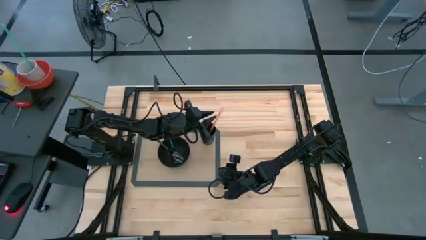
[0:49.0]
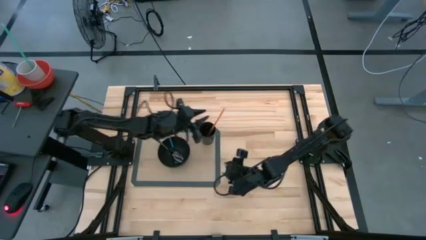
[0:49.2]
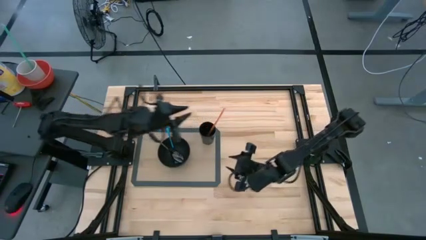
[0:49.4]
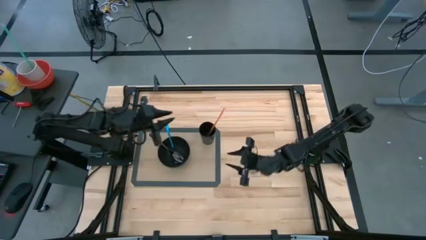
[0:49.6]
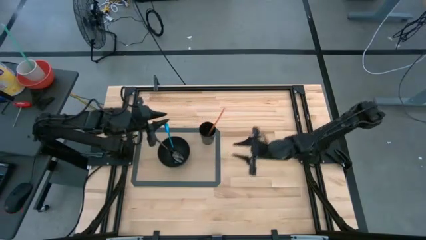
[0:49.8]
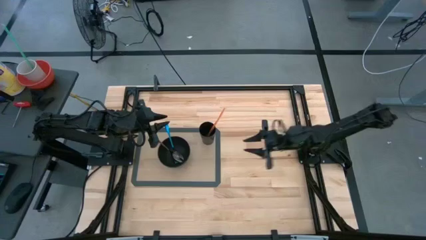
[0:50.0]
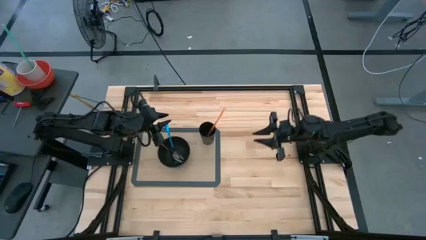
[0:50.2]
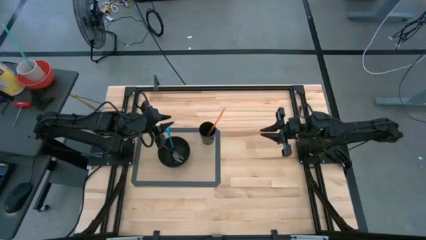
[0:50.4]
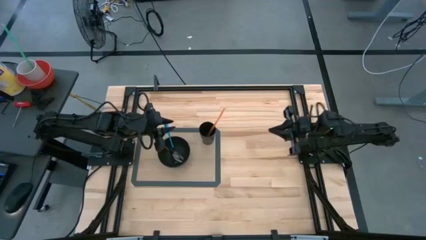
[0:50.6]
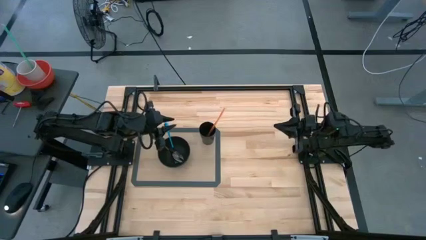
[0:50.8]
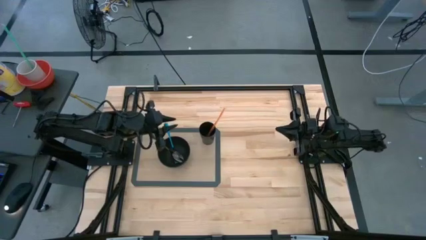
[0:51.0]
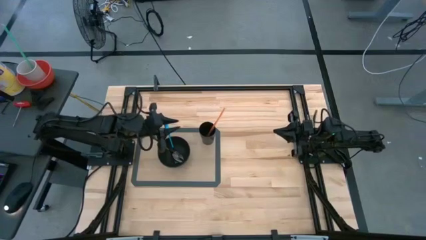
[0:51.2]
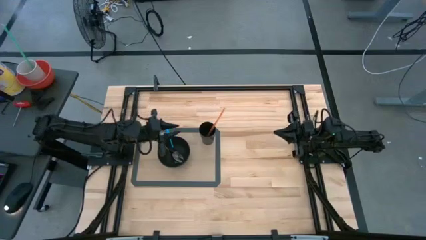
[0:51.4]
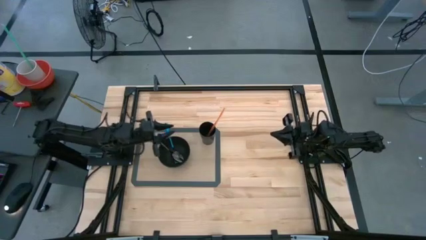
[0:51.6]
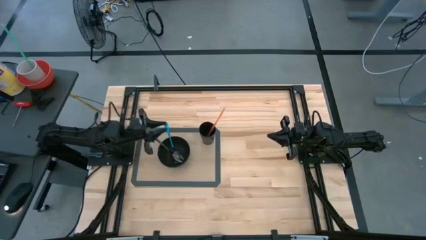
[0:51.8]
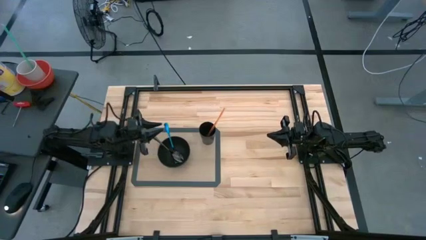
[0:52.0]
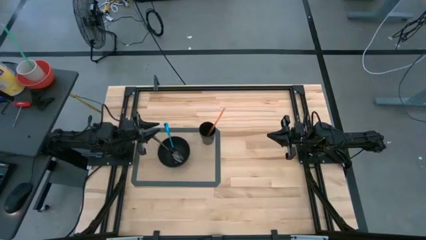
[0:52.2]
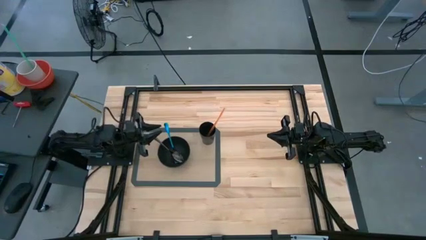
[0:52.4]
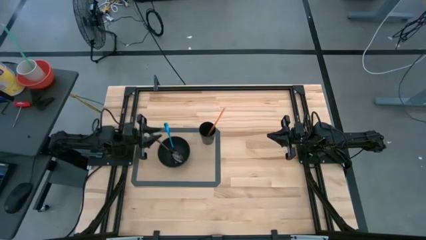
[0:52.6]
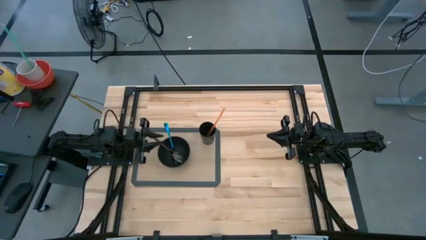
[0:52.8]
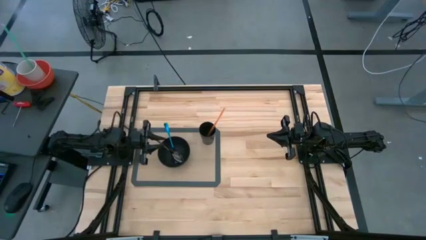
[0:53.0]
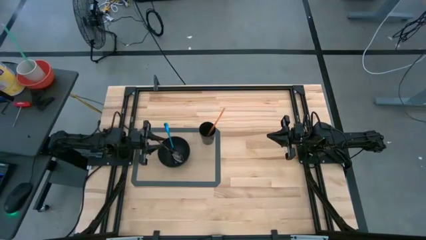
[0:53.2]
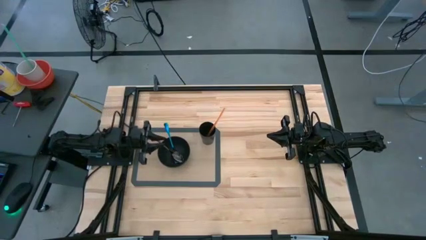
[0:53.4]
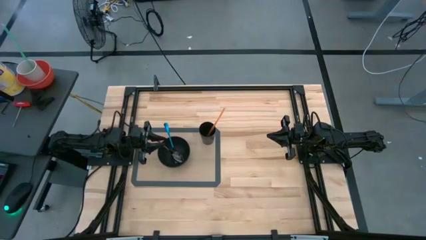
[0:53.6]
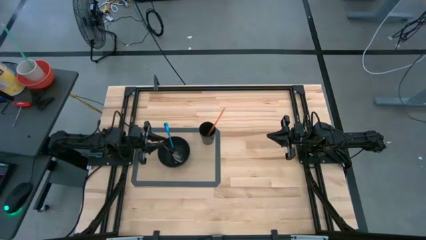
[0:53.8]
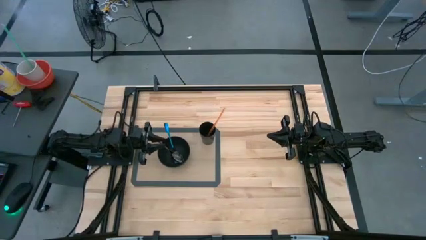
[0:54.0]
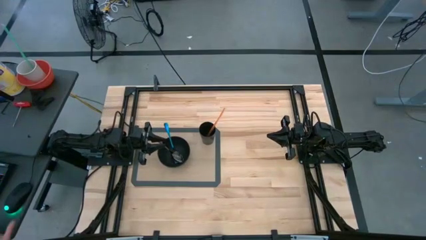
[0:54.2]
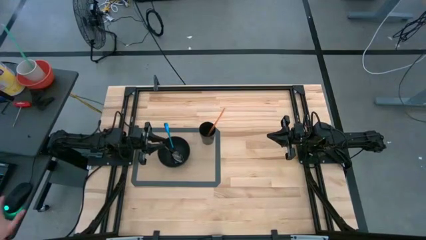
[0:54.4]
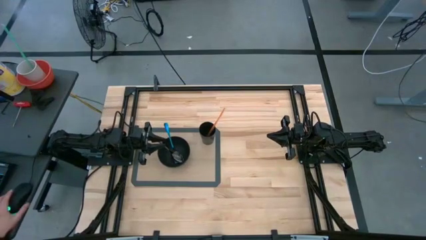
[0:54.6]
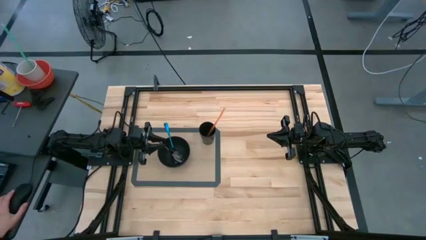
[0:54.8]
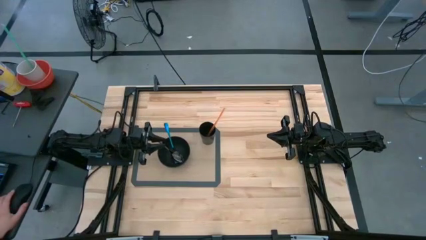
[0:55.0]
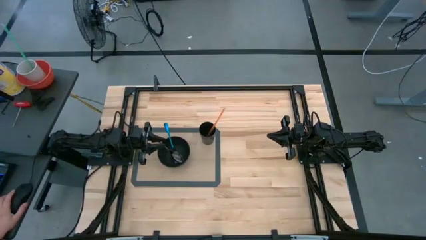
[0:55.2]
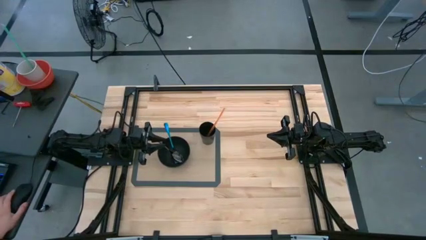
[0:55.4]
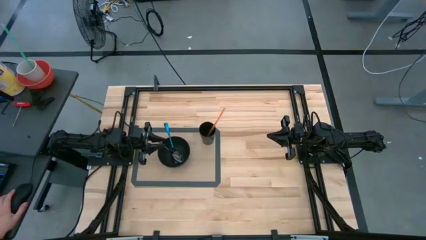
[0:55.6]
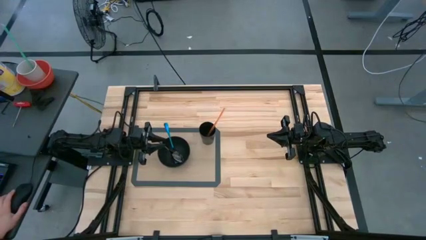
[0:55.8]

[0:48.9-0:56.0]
Task: Pick & Place Utensil
Return to Home Position

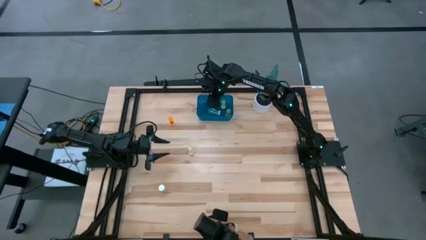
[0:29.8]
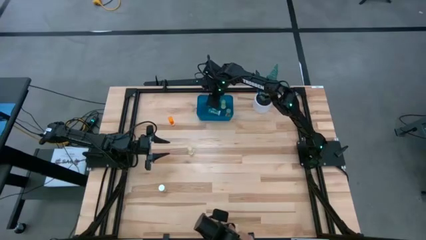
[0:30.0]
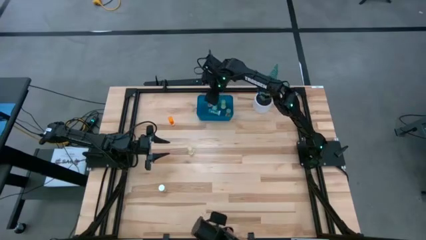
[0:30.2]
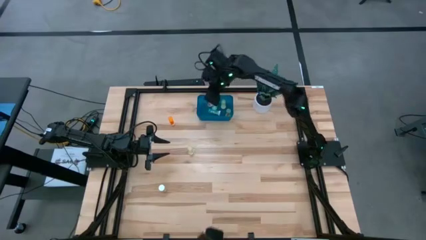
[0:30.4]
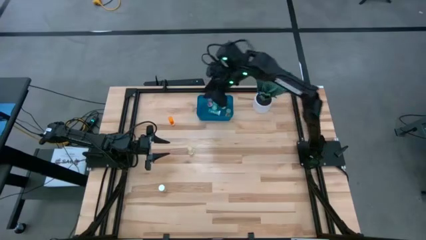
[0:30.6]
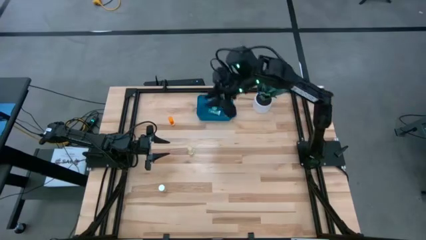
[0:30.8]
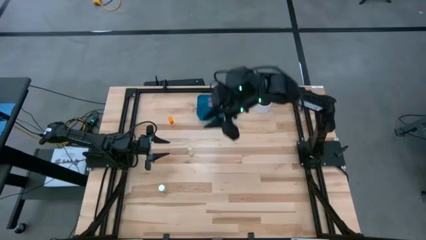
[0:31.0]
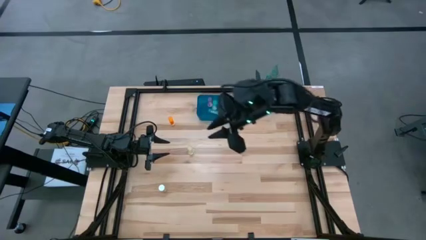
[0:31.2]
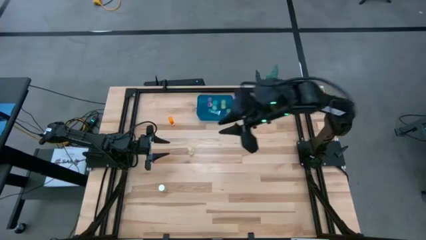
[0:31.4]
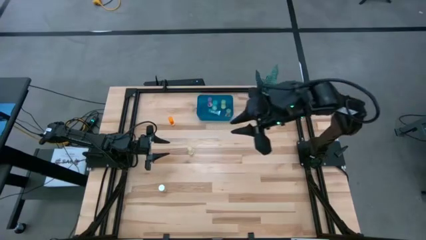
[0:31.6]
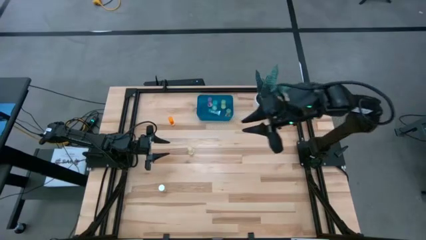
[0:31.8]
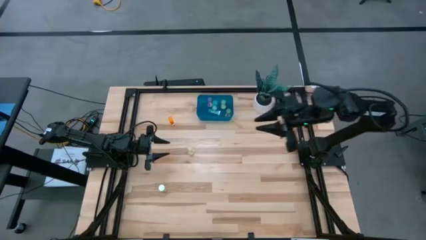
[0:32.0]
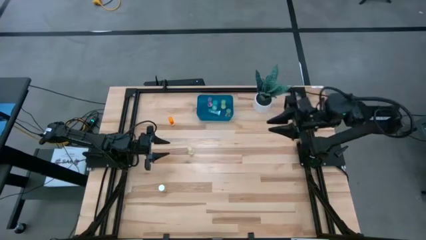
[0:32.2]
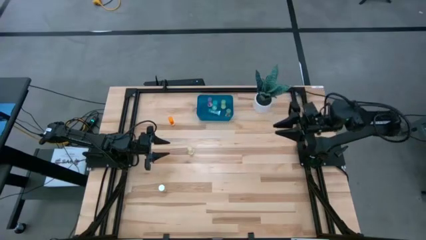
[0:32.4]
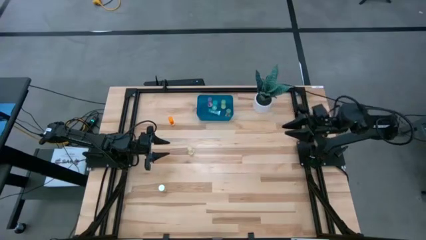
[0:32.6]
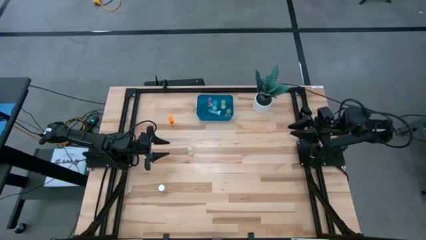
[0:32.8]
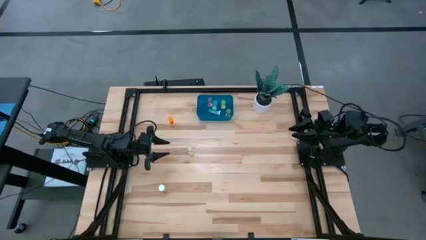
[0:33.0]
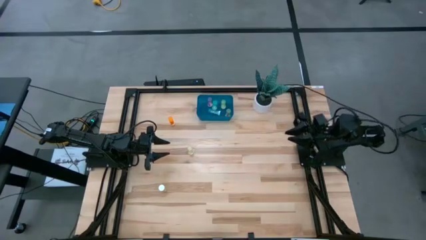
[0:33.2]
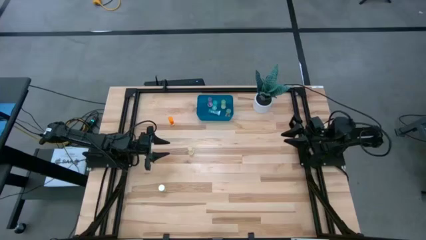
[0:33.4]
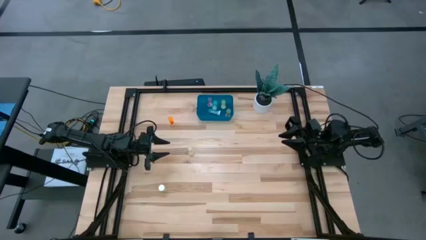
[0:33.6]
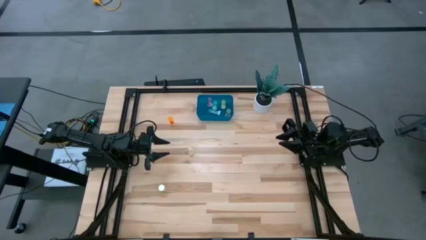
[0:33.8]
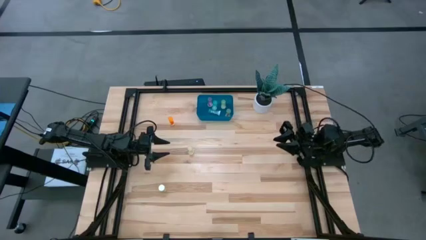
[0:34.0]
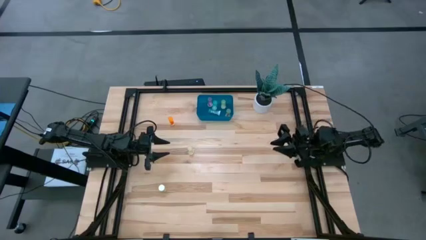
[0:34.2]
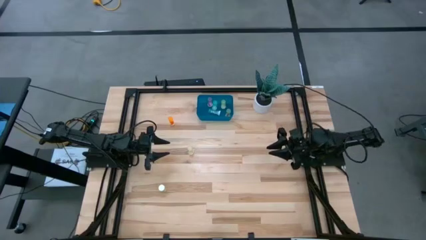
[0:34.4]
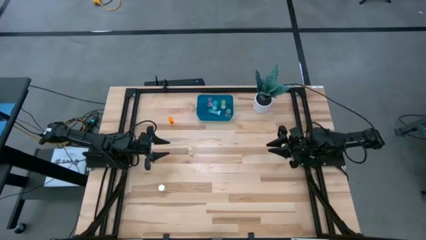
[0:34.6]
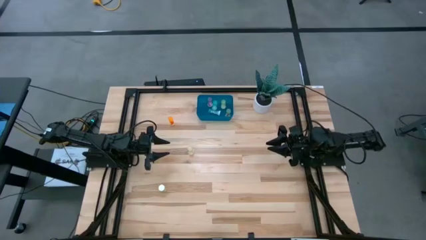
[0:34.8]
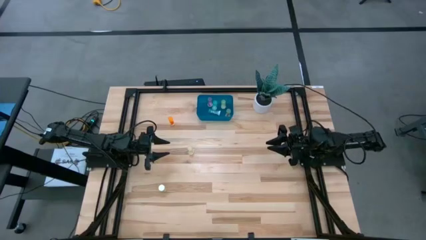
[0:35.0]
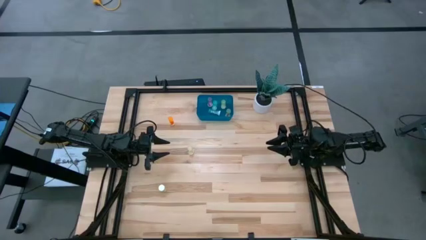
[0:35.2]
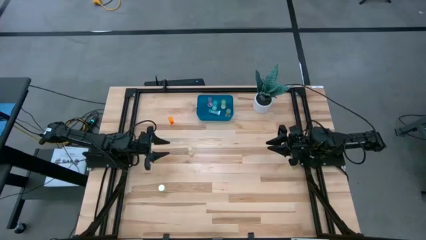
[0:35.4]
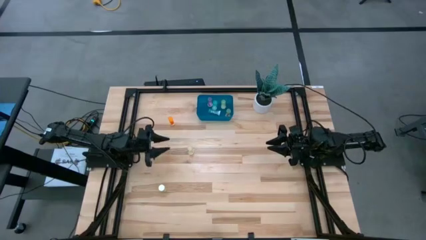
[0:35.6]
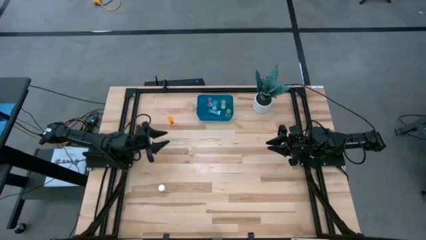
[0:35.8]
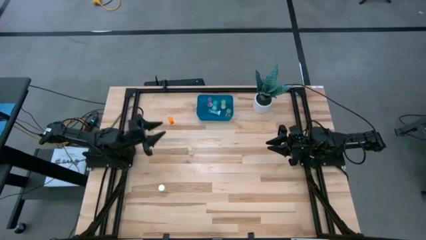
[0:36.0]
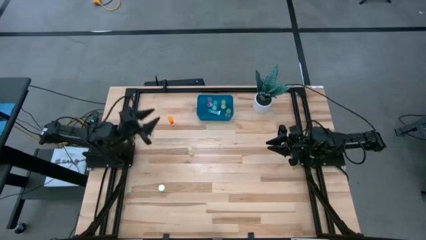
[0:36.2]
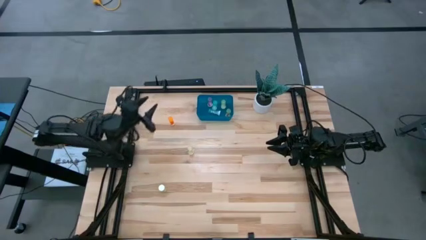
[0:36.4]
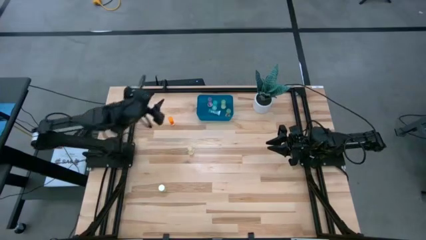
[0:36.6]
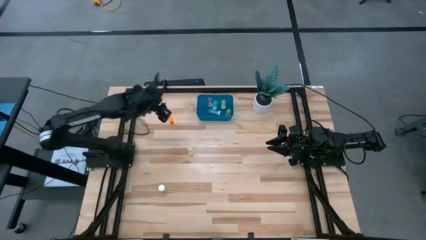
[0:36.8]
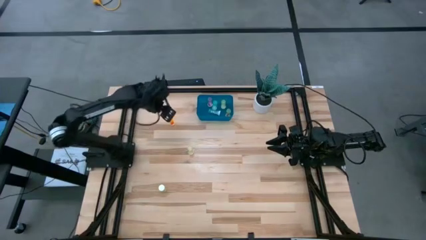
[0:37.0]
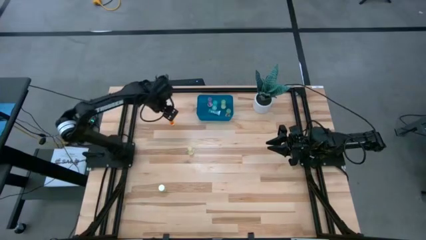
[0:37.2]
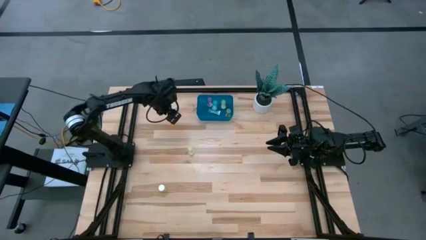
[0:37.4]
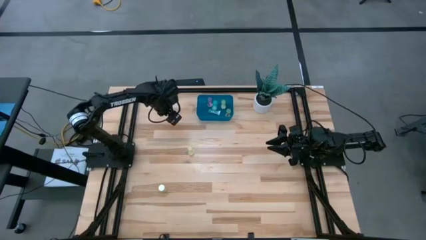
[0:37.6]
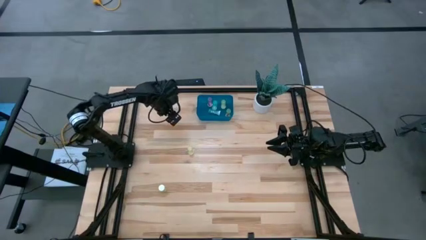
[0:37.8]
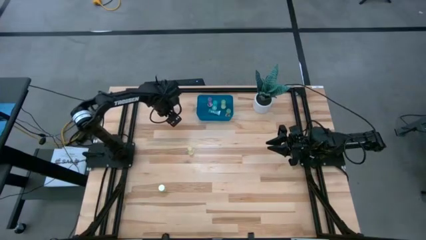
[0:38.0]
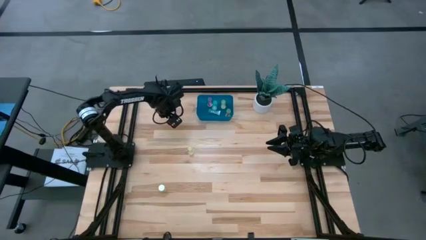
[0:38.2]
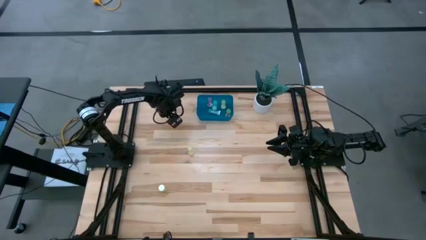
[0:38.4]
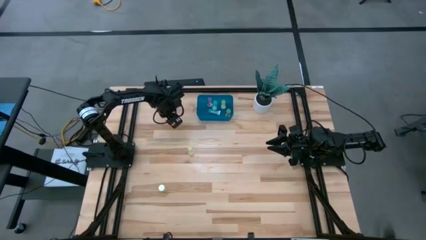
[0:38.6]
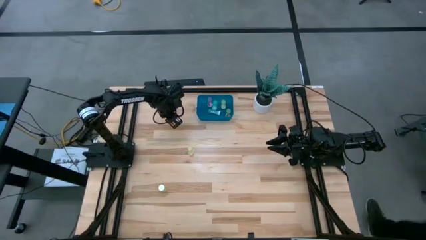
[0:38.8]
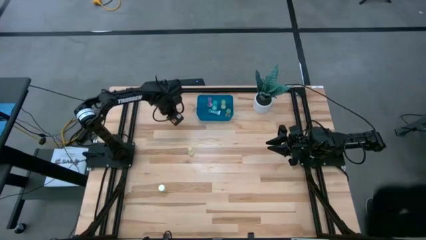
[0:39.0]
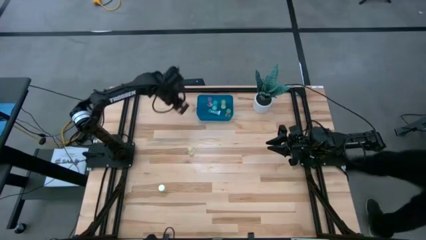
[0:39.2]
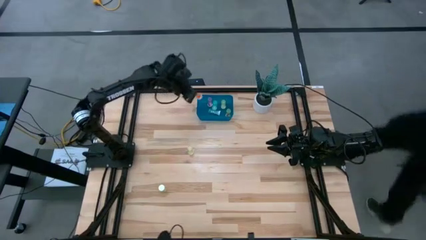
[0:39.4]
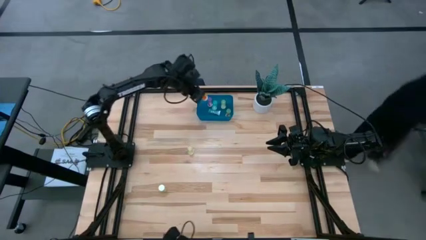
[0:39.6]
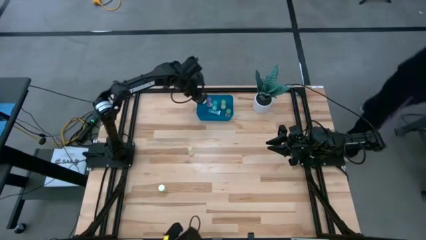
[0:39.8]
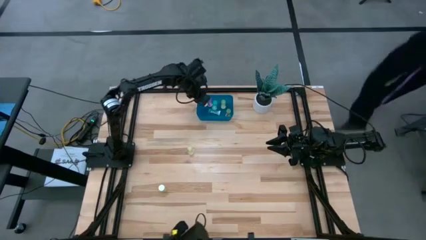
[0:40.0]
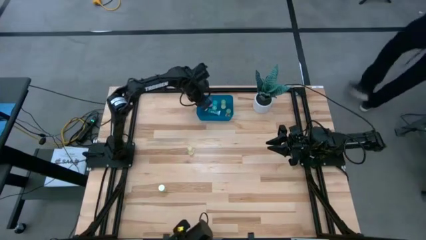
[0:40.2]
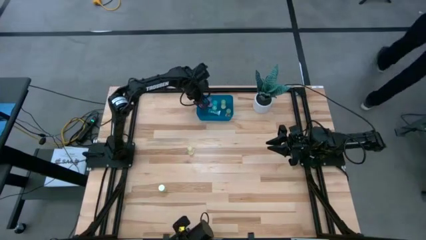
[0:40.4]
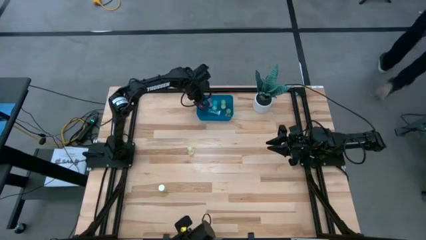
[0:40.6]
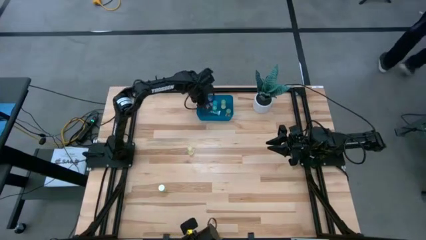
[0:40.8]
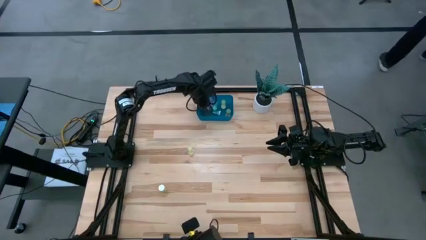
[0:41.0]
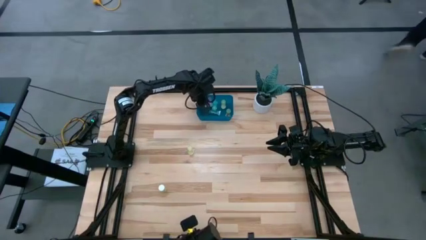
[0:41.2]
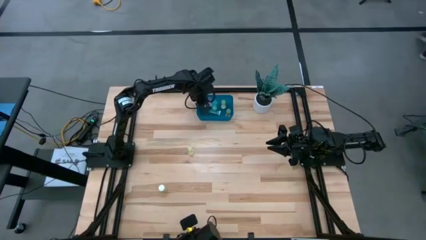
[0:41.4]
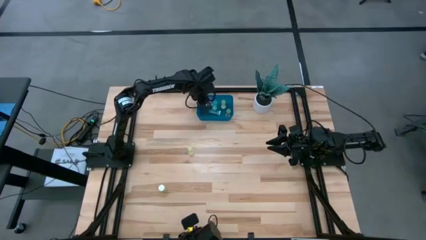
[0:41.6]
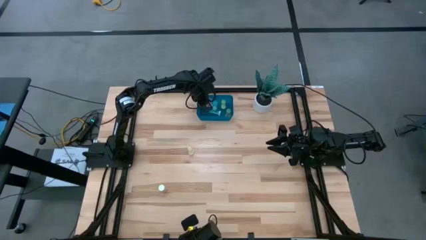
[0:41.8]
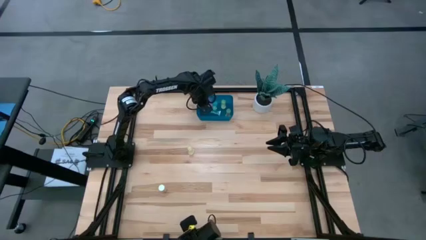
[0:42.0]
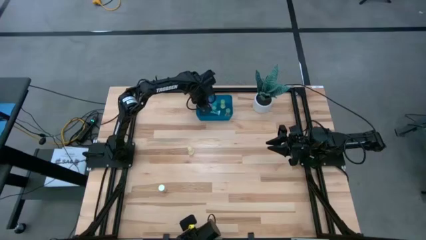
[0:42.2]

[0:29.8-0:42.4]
Task: Pick and place pill bottles into a basket
Put the orange pill bottle into the blue bin
